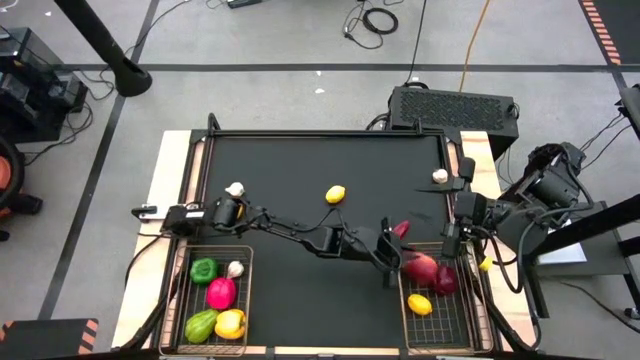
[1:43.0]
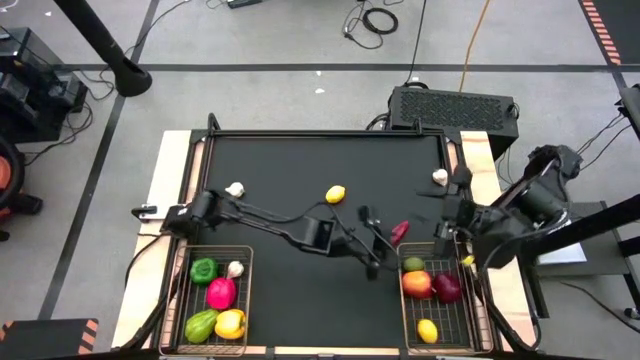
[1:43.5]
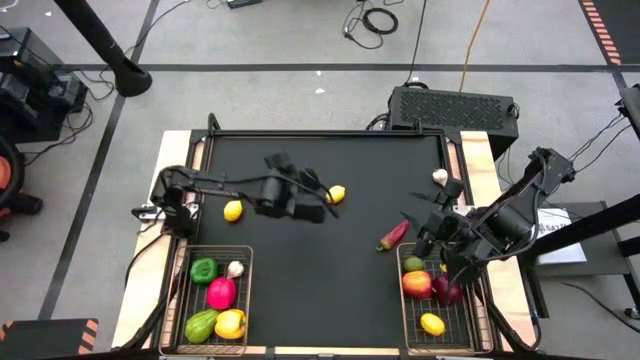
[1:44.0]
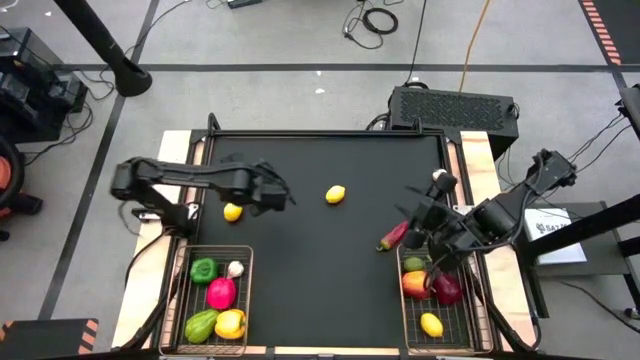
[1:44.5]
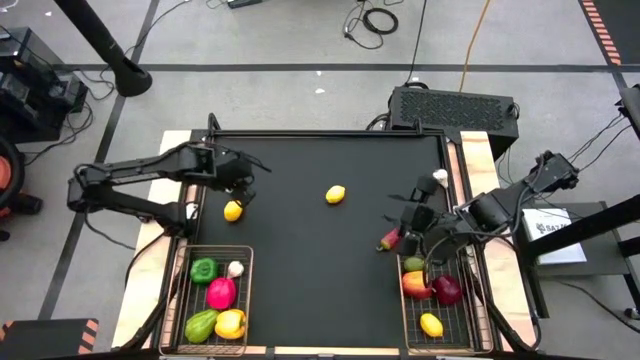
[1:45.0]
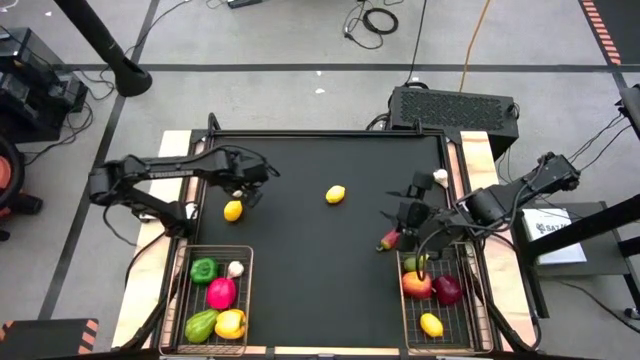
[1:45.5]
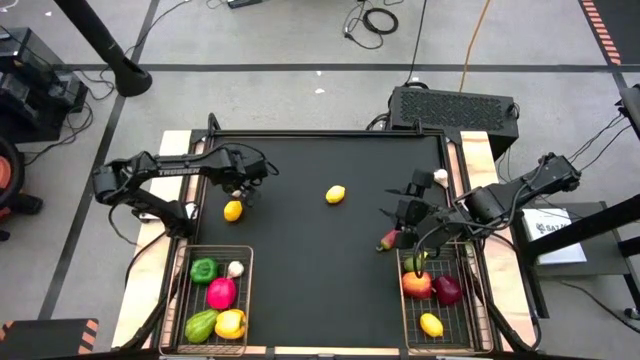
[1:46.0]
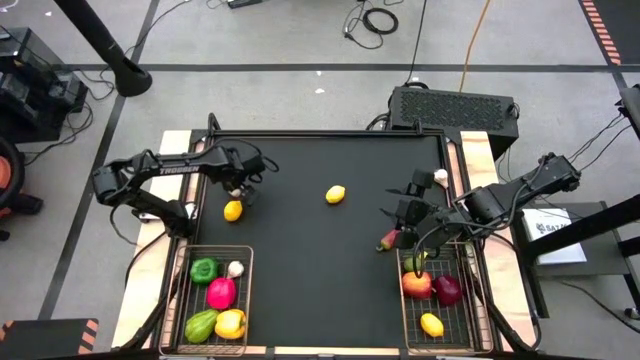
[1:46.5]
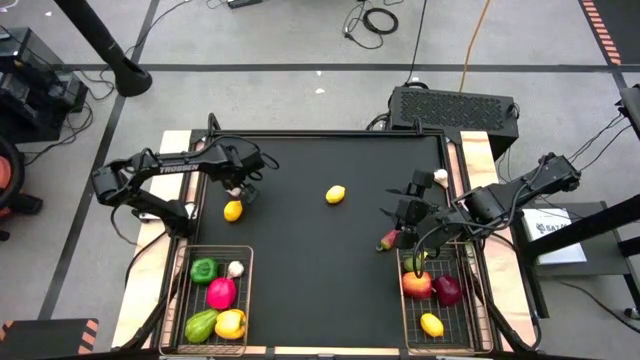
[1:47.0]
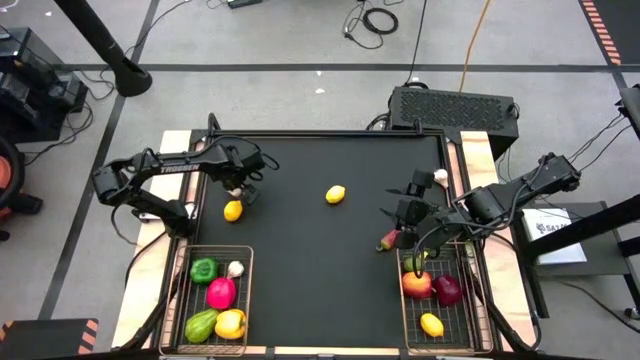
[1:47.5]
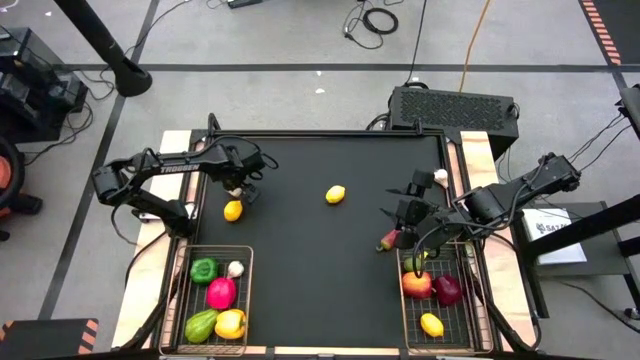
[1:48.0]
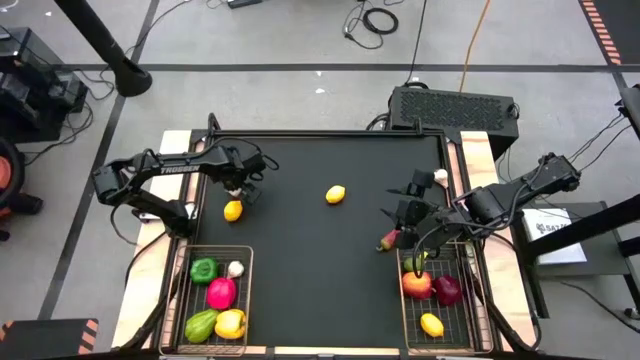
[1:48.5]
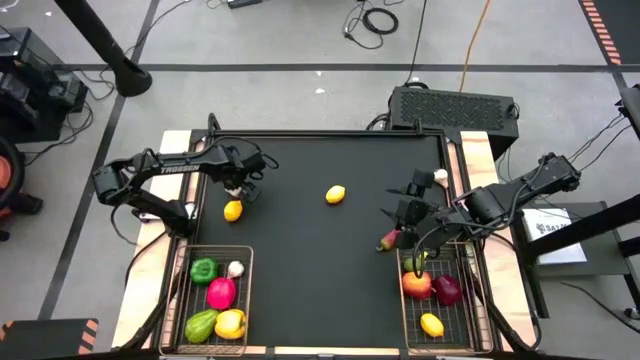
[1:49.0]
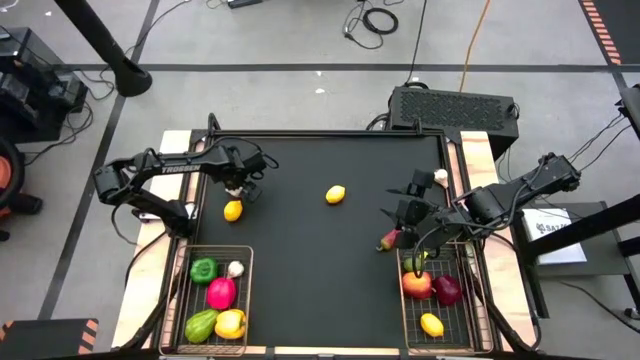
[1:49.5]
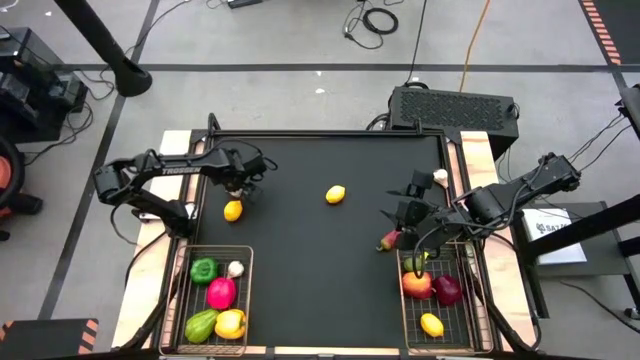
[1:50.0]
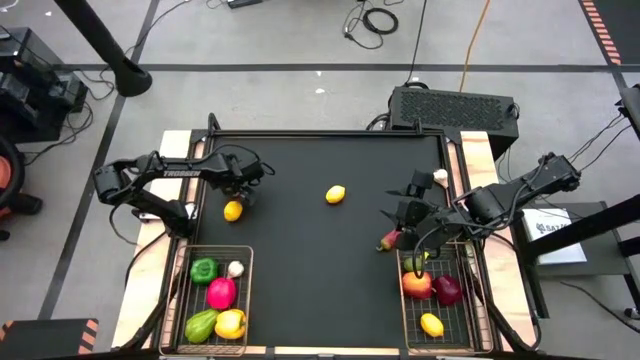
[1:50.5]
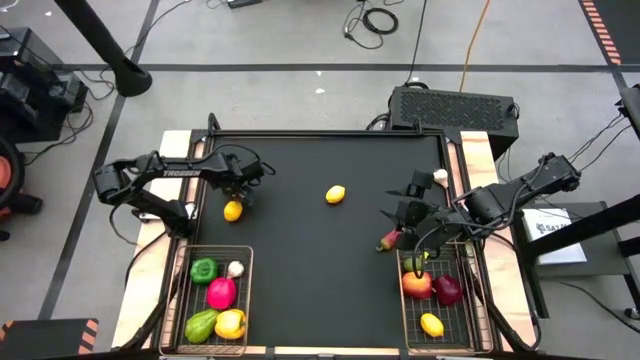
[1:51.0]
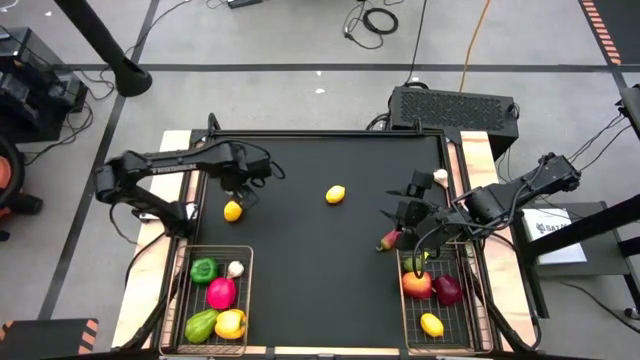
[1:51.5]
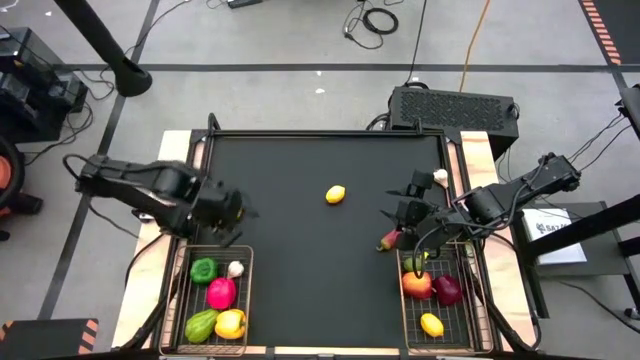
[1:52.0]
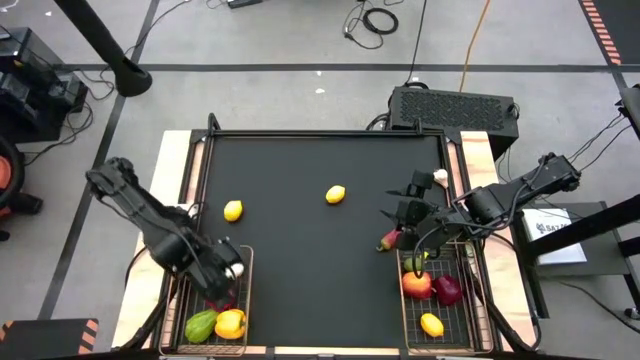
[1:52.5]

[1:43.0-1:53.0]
Task: Sort produce into baskets
Put the left garlic into the left gold wire basket

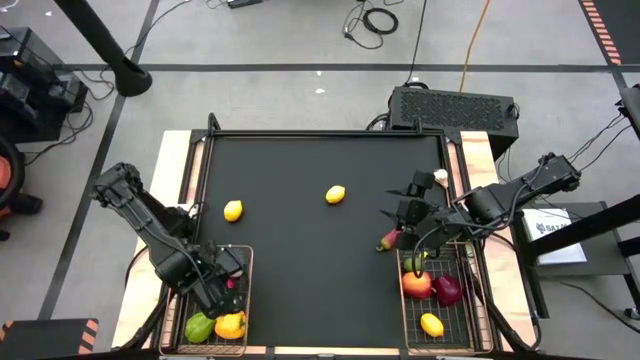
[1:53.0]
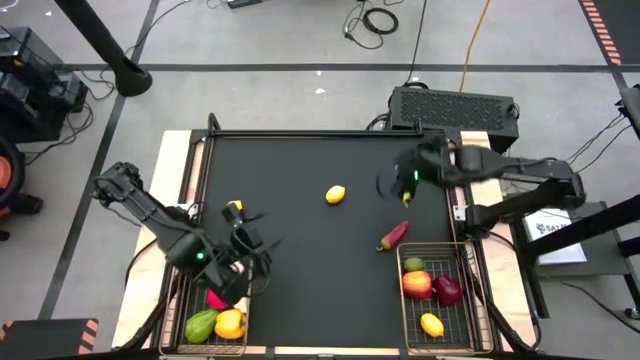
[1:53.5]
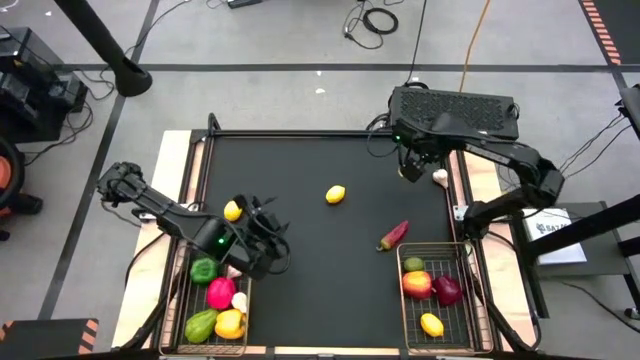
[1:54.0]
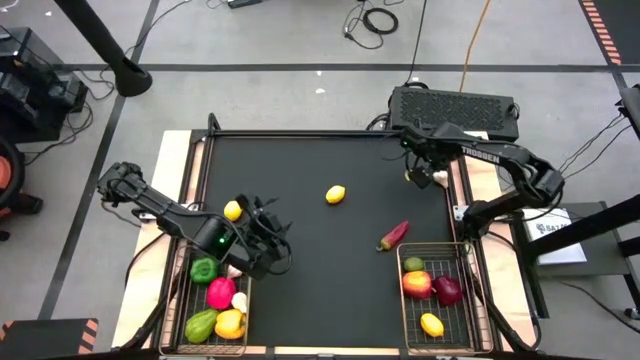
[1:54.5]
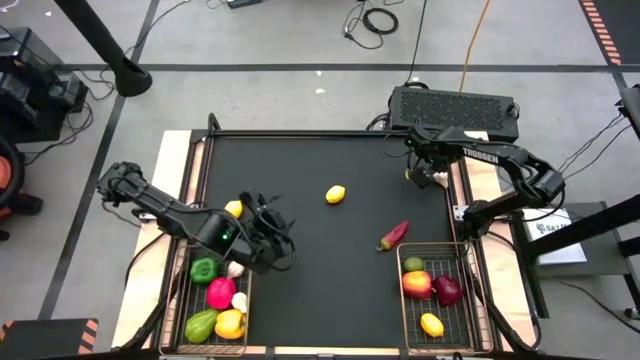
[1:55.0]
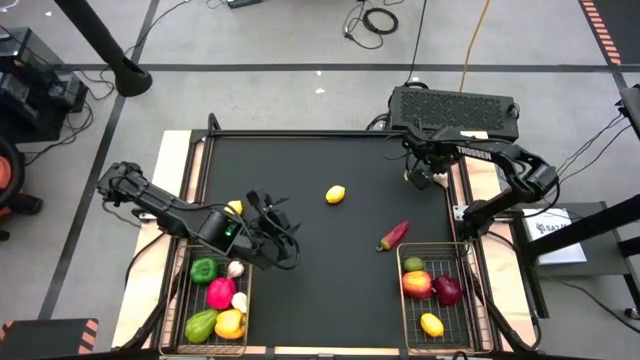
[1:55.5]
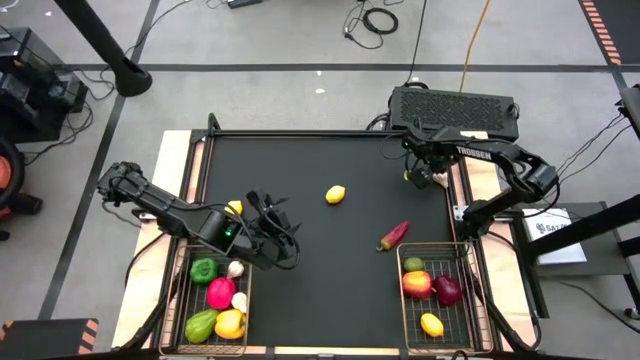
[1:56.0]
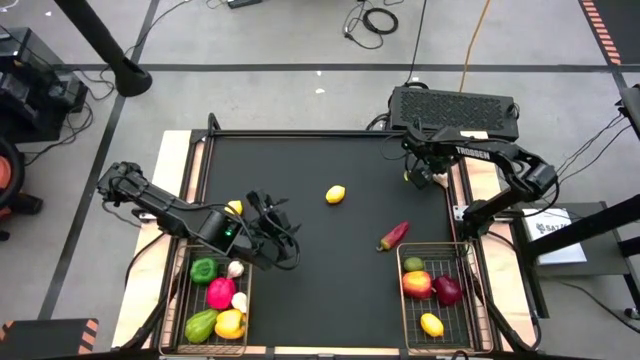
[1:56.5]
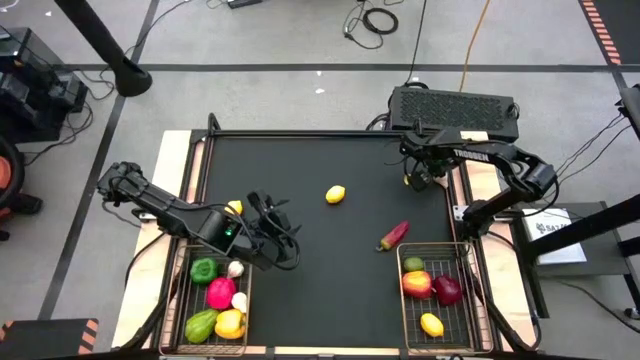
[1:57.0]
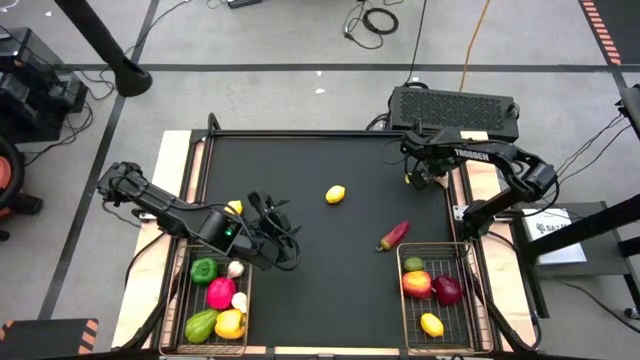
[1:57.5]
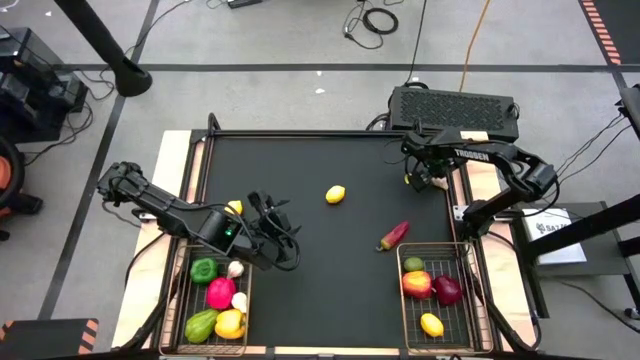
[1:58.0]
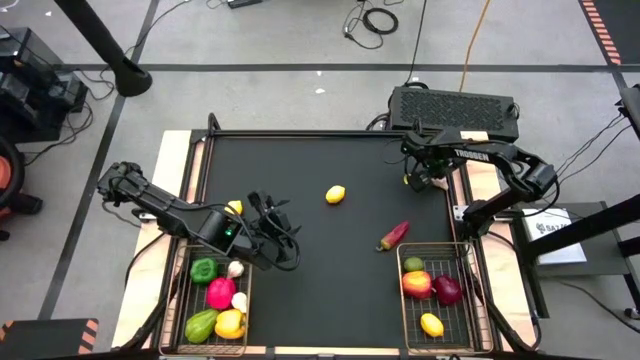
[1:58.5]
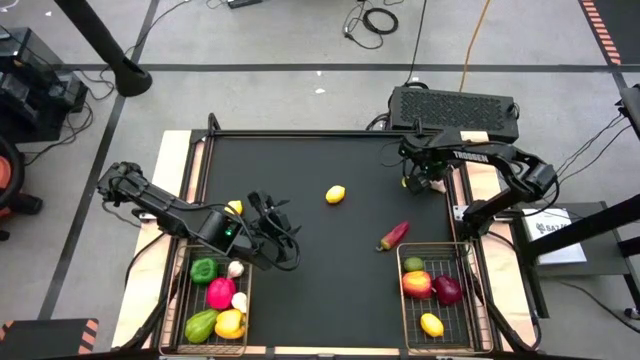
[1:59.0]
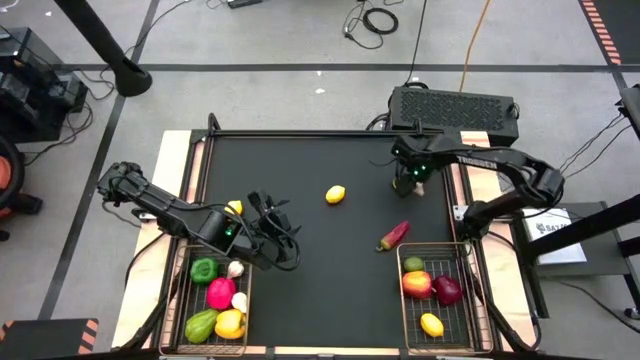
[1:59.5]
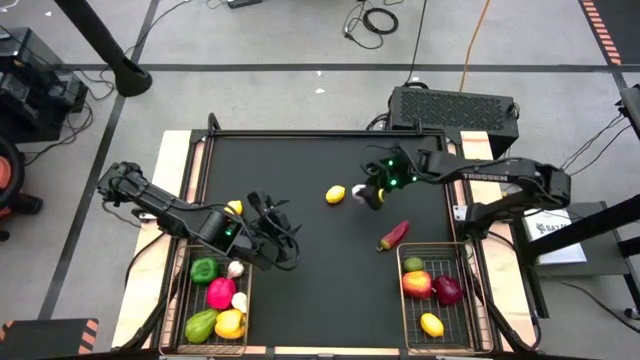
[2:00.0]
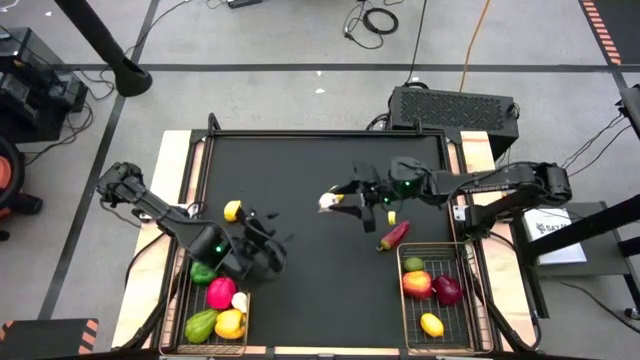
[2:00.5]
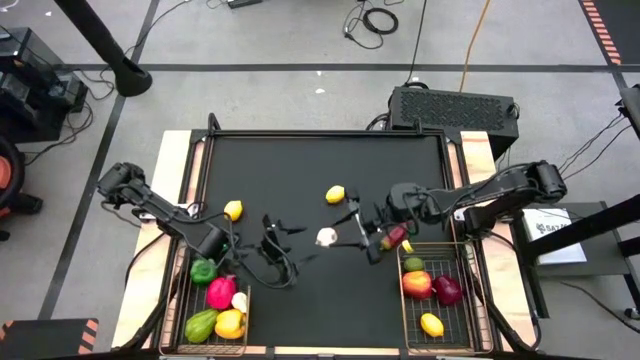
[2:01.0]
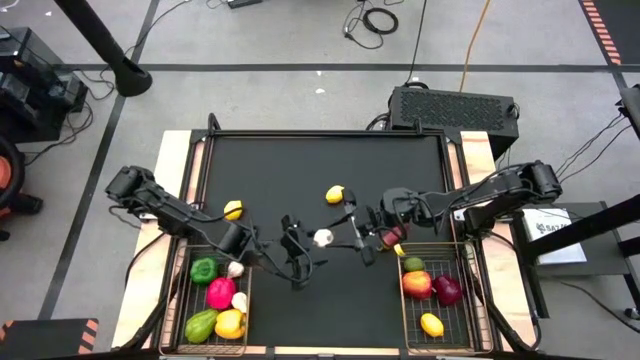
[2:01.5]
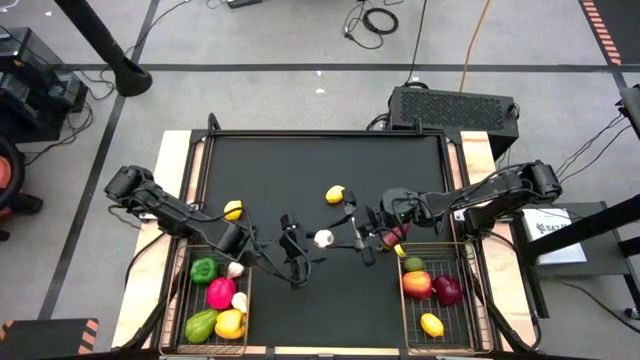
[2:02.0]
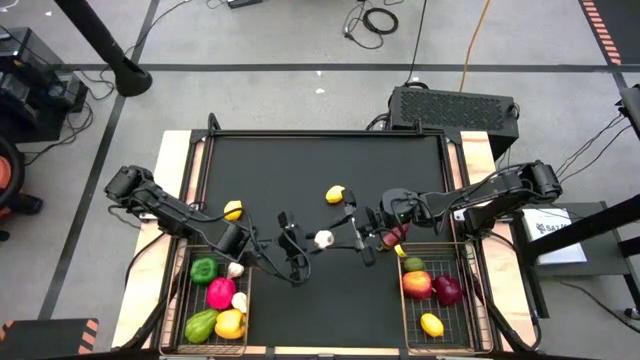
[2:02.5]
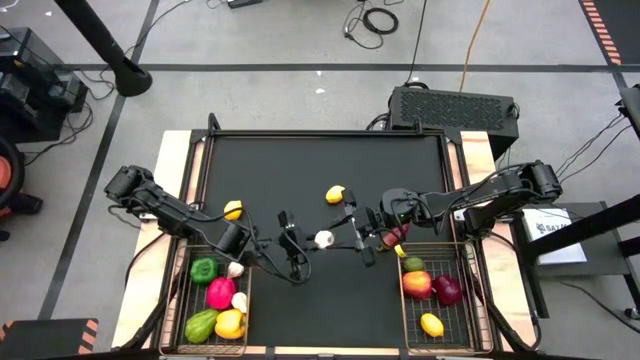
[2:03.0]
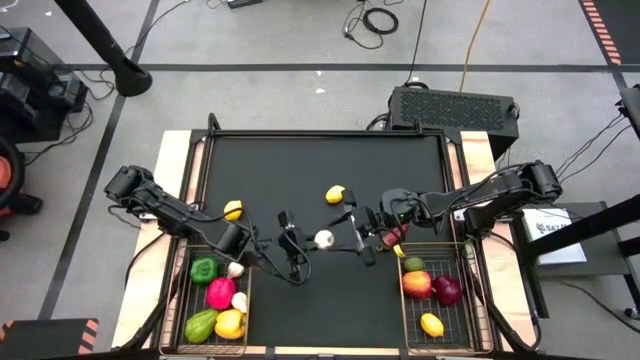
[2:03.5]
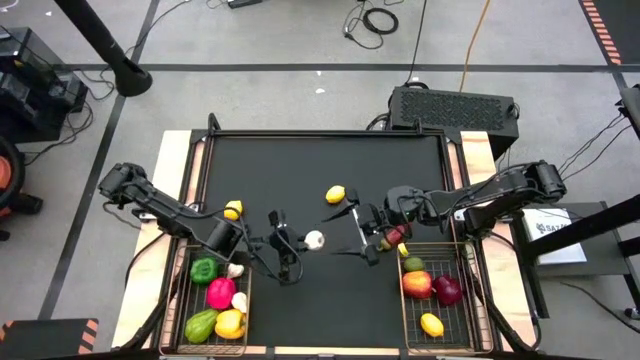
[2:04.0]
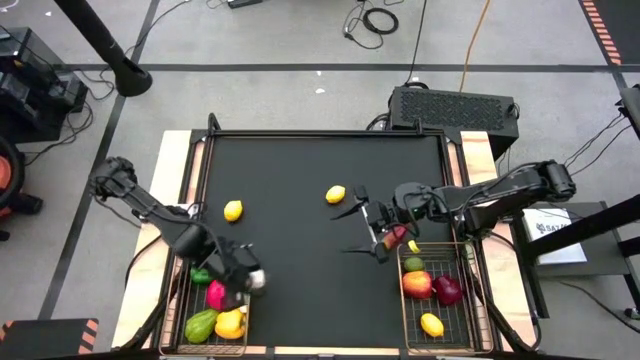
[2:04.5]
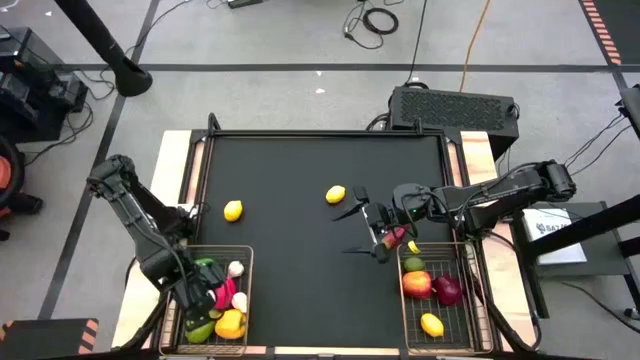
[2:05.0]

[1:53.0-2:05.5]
Put the garlic into the left gold wire basket
